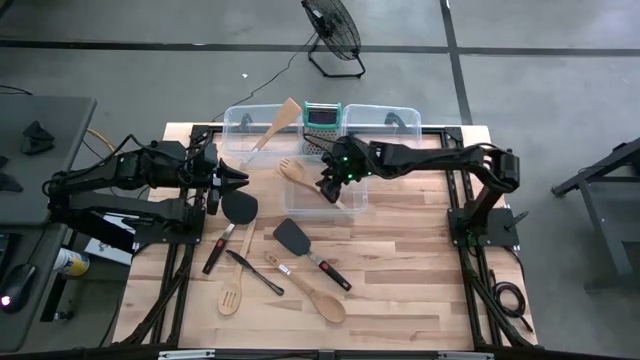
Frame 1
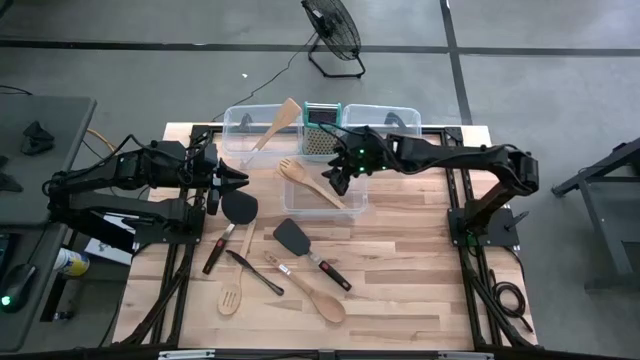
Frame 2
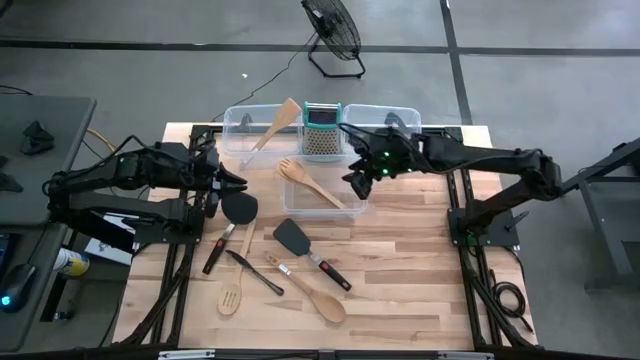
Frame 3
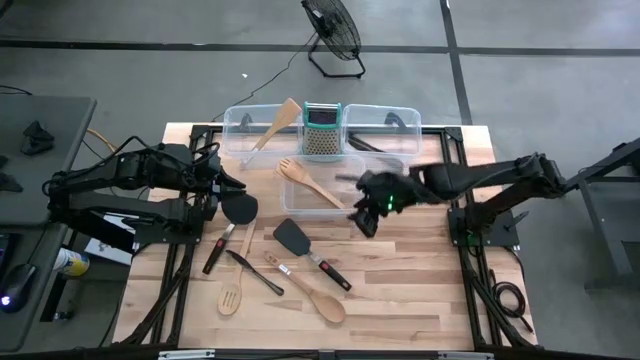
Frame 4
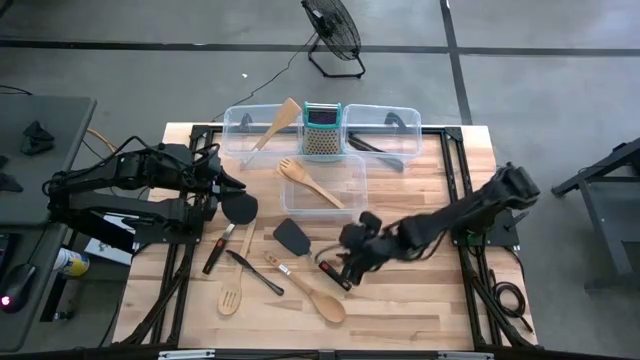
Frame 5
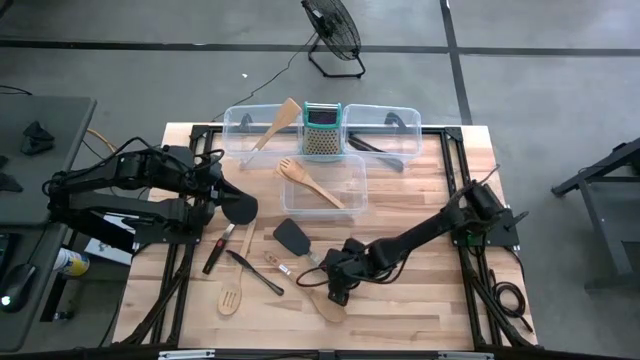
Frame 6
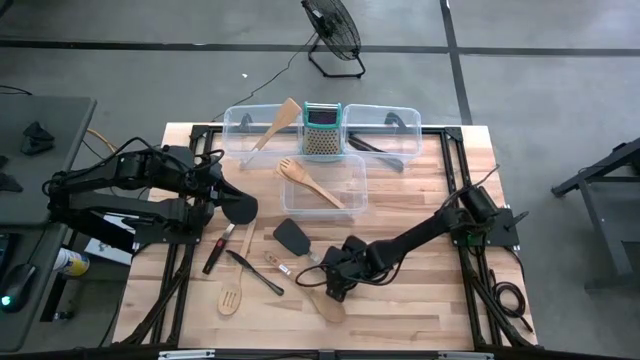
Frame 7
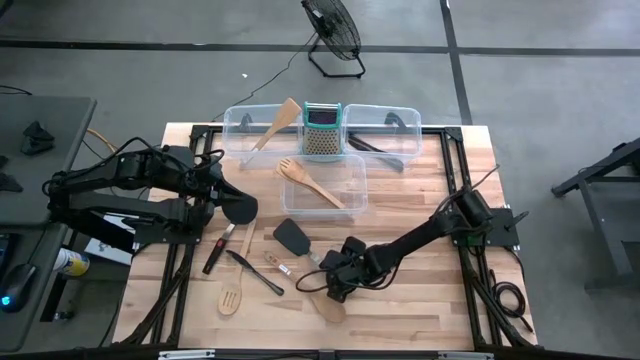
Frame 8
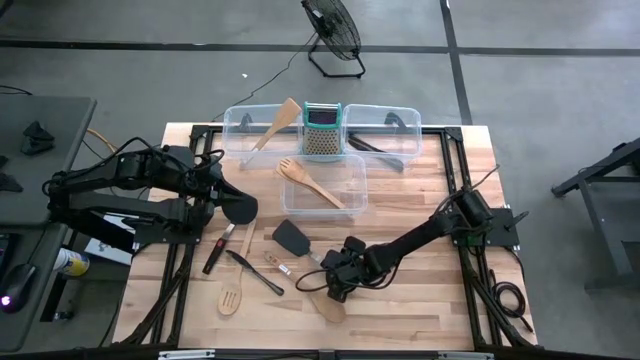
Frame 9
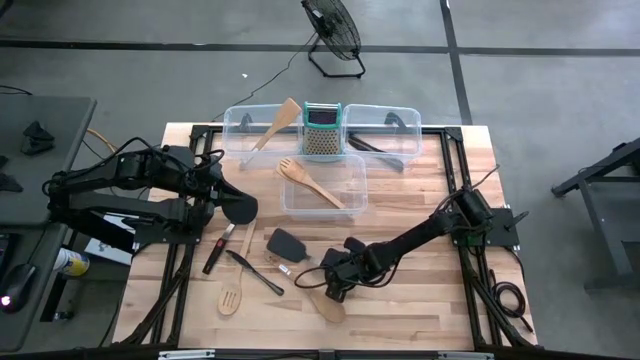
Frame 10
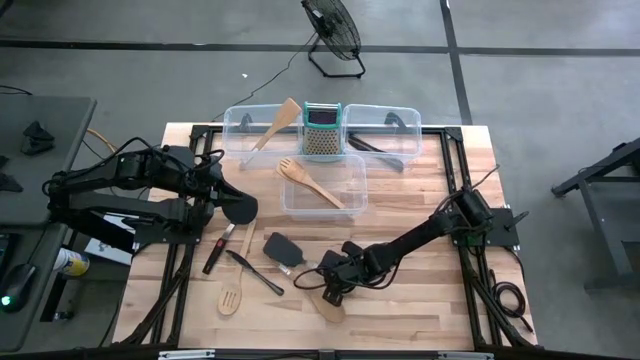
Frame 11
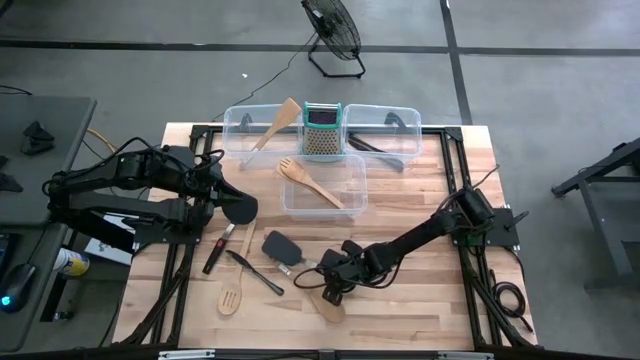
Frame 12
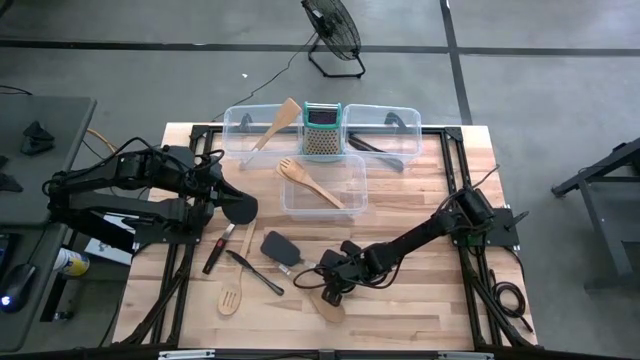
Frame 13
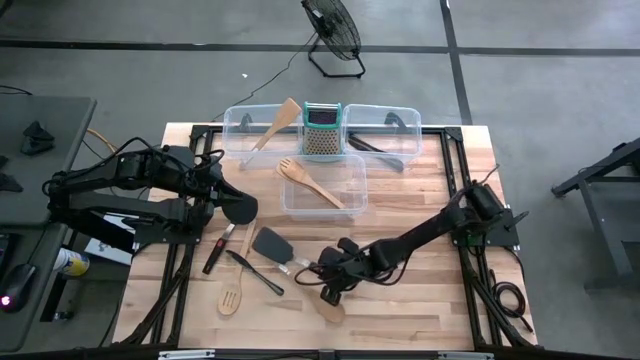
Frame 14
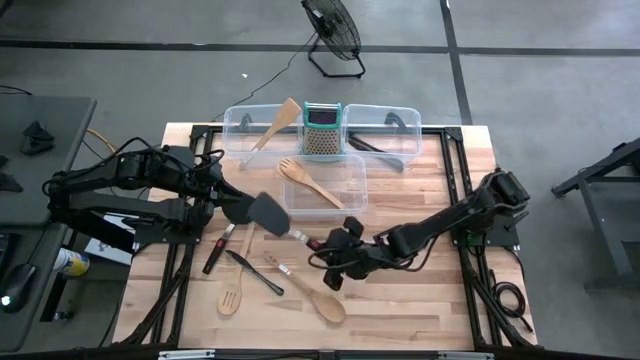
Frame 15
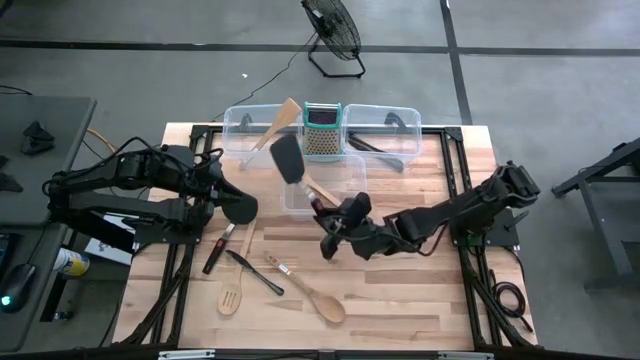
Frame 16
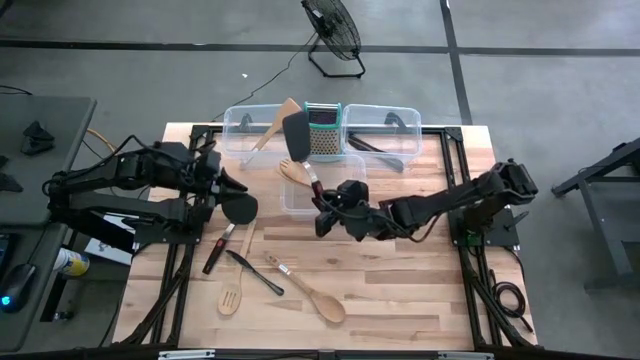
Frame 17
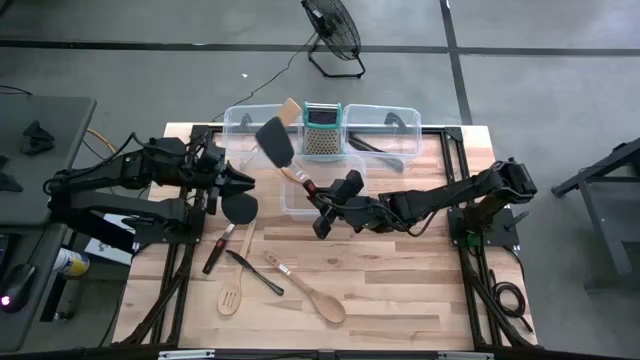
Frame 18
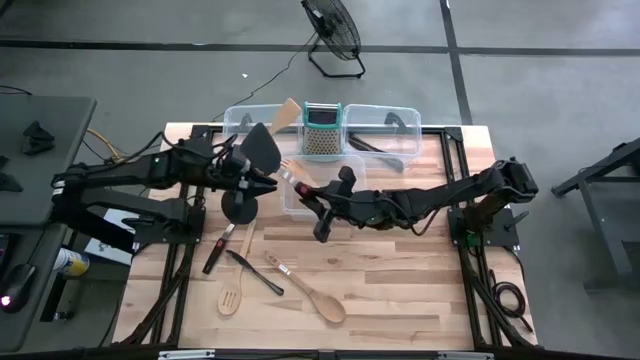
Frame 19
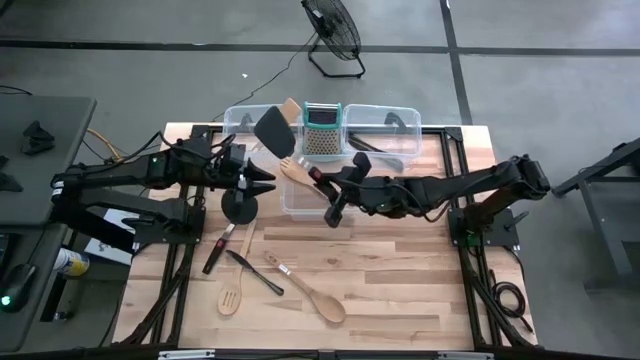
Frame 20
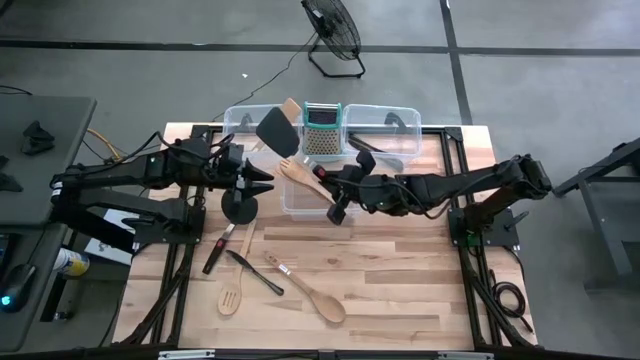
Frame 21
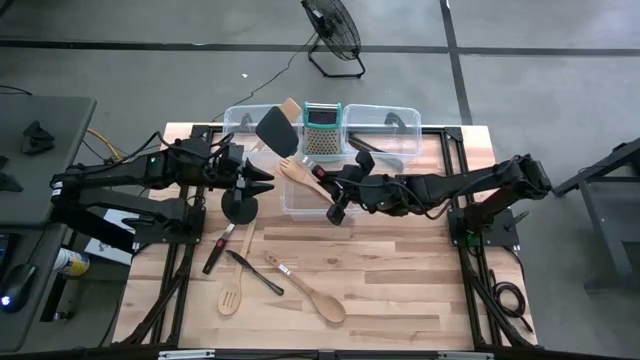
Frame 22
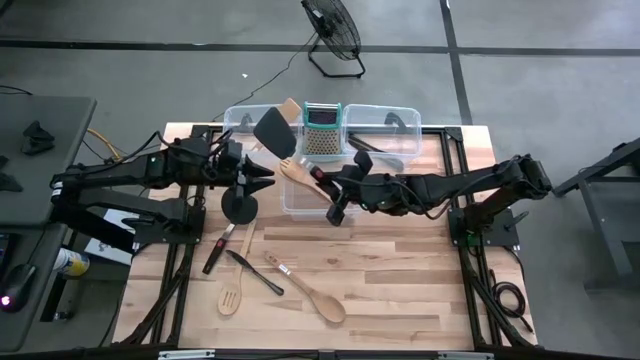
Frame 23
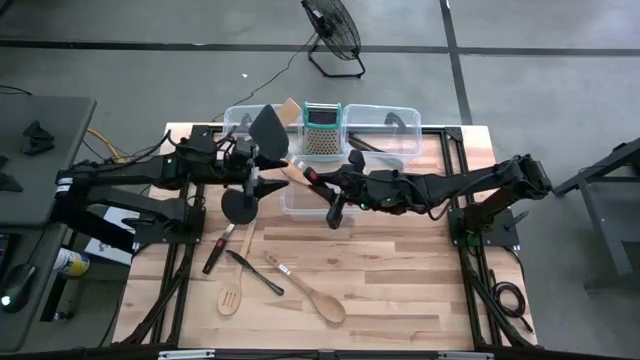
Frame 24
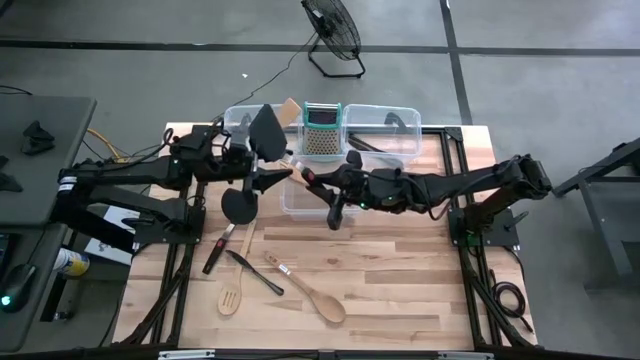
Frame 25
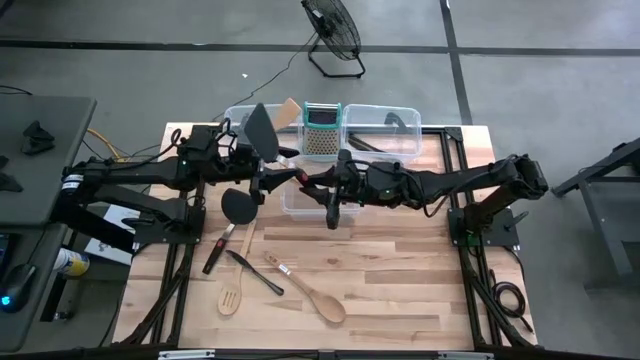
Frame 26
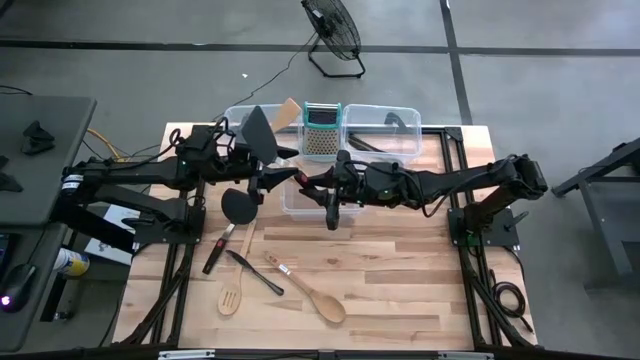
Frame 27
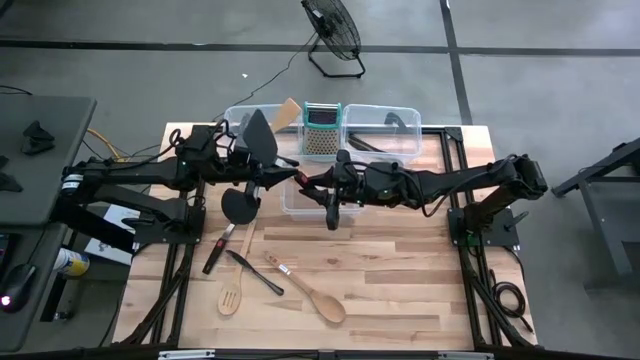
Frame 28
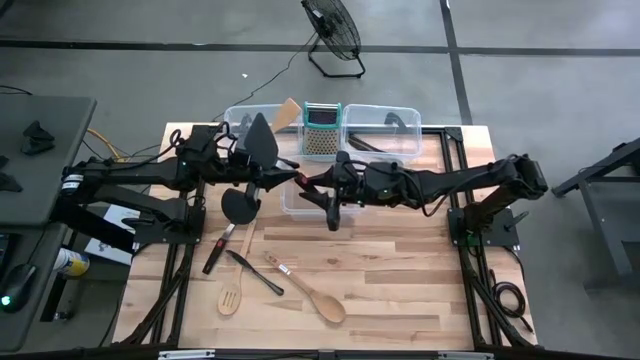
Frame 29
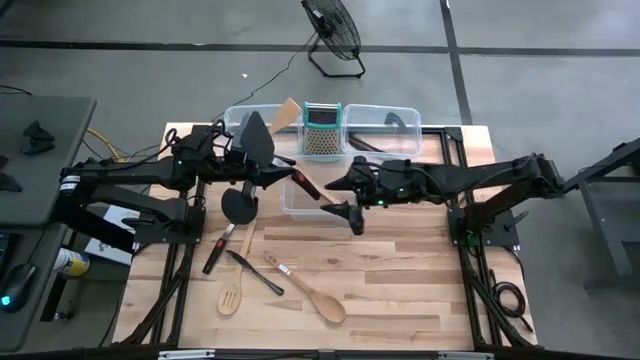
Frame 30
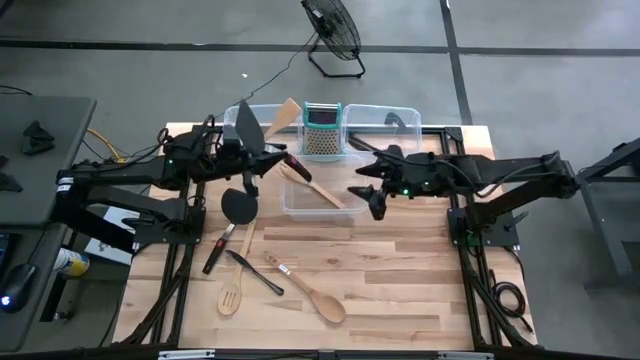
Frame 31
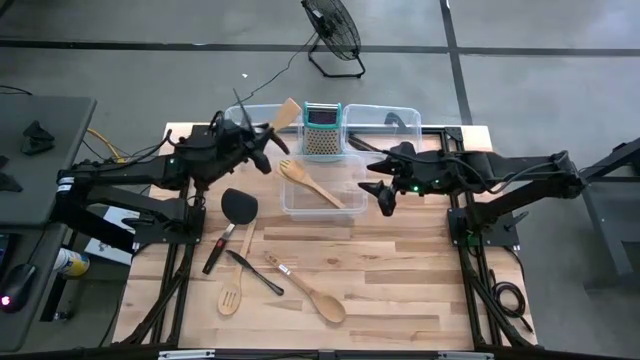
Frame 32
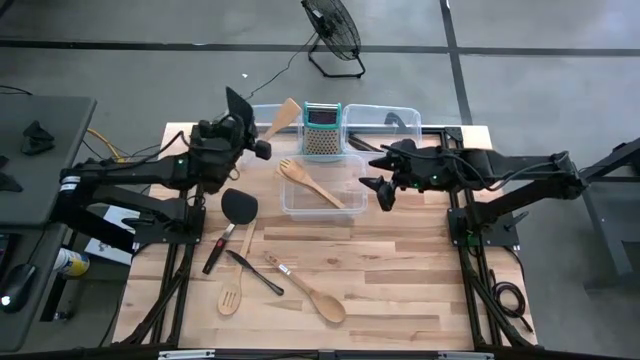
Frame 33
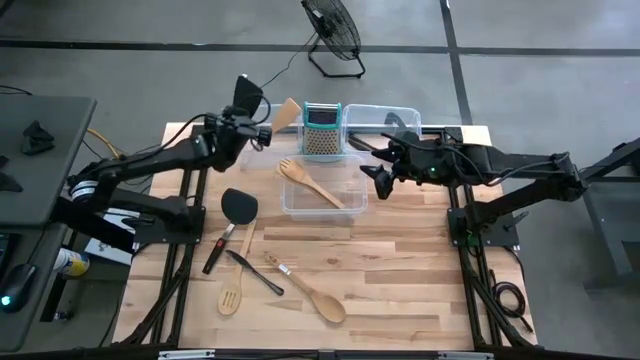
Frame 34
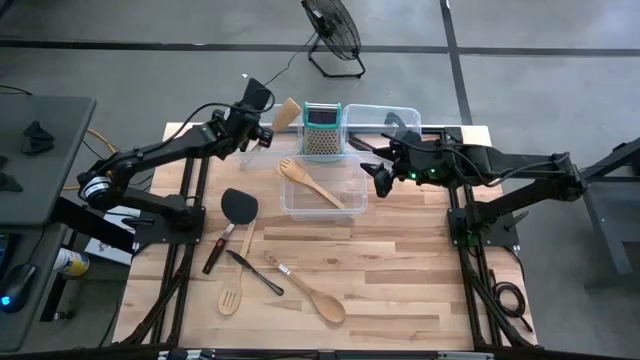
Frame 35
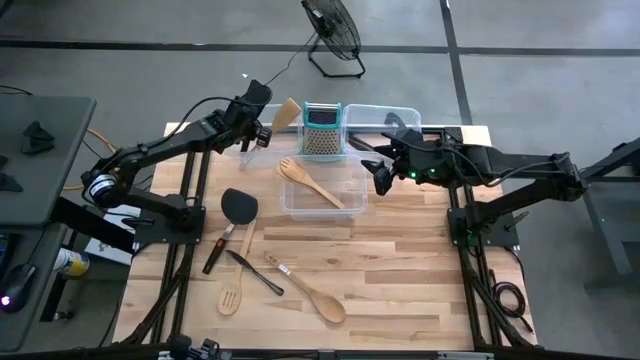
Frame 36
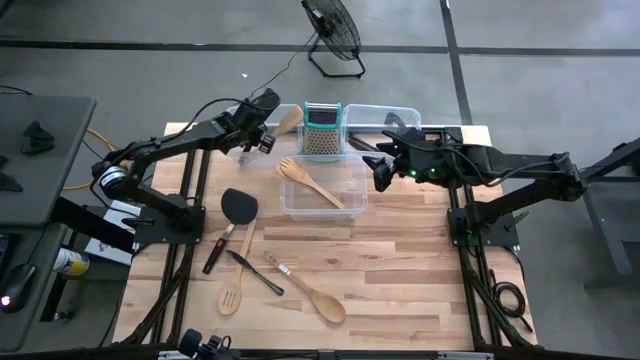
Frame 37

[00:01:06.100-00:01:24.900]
Task: Pick & Place Kitchen Items
Put the black spatula into the left transparent bin

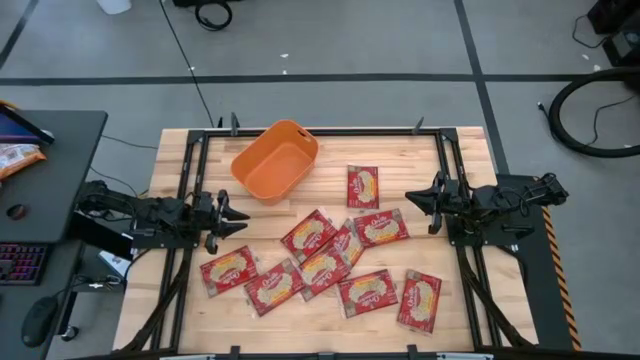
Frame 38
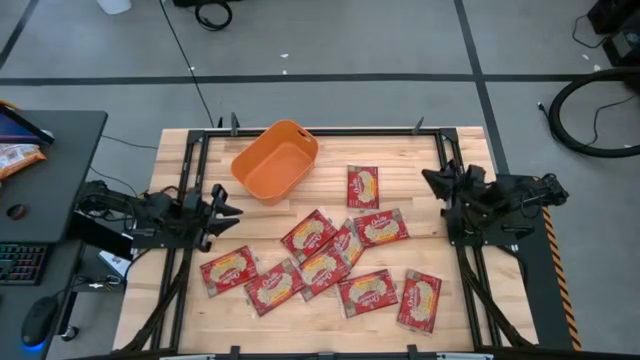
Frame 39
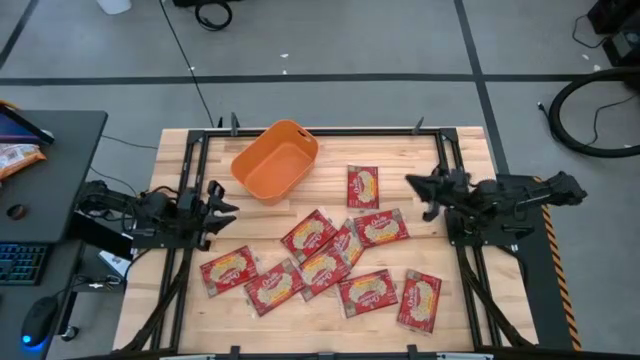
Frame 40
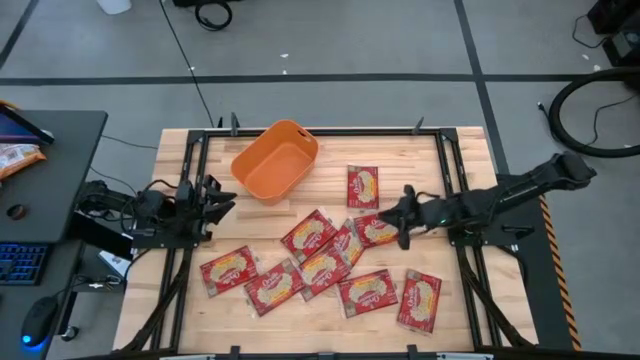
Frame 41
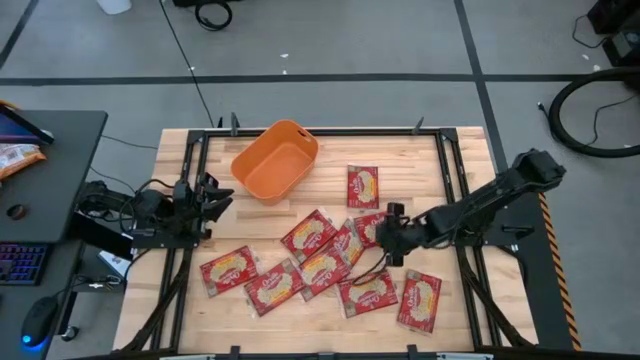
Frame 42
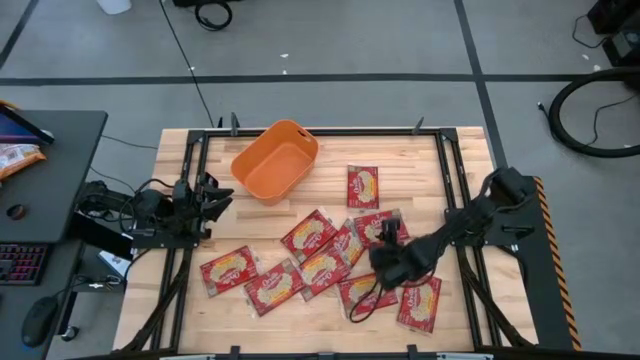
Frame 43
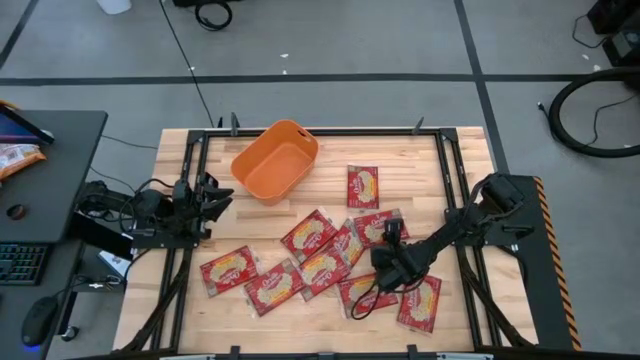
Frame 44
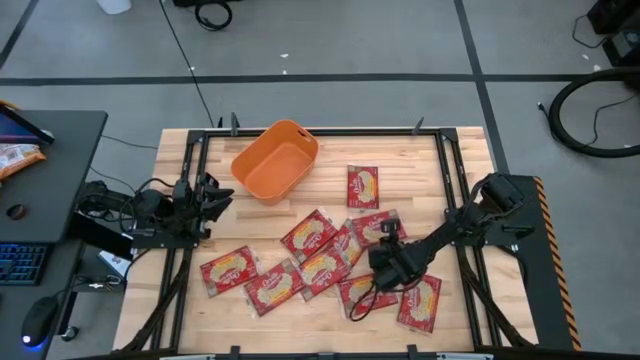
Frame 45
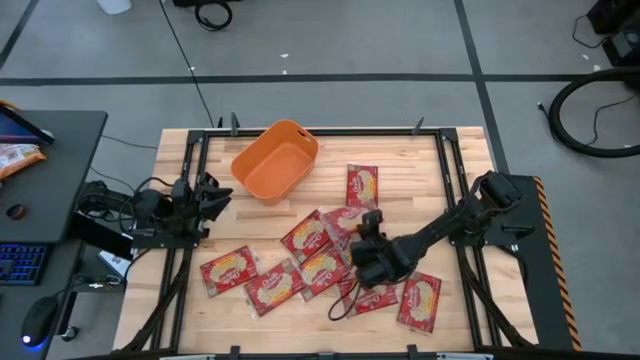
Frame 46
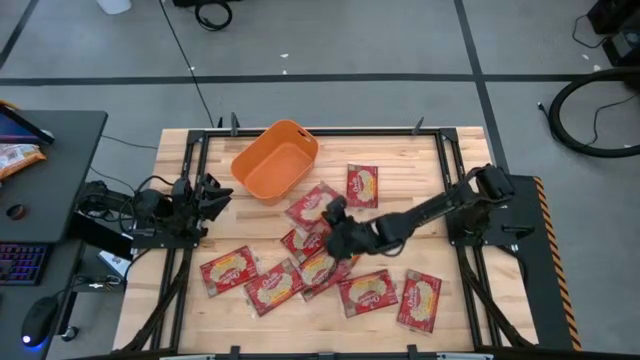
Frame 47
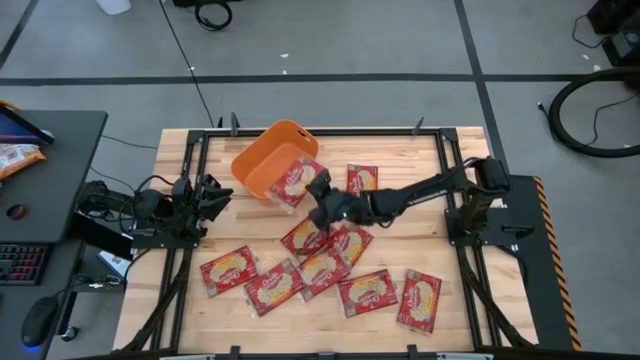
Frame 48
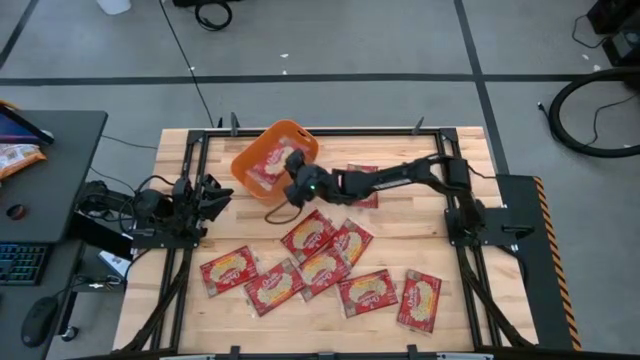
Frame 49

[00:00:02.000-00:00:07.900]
Task: Sort popcorn bags into baskets
Put the red popcorn bag into the orange bin
